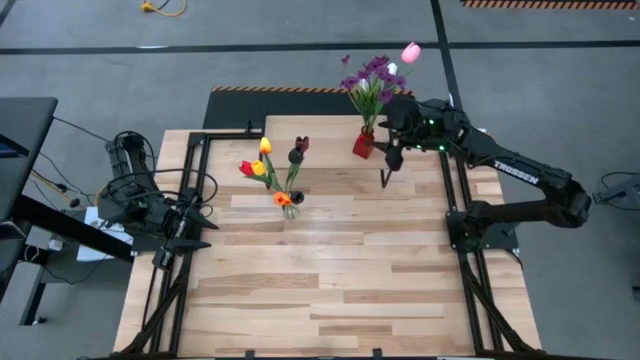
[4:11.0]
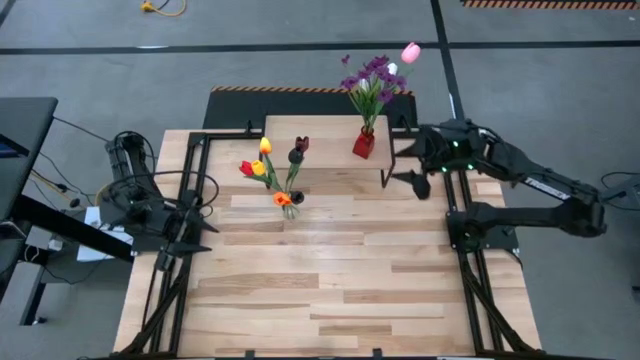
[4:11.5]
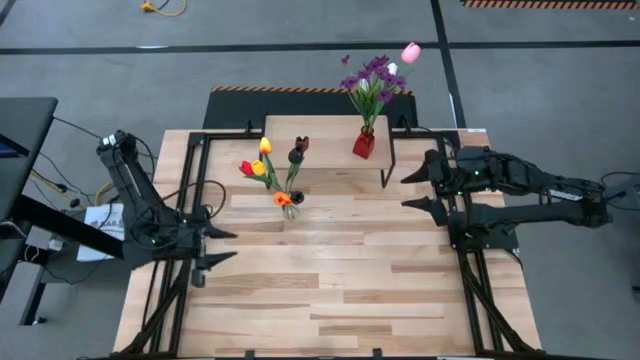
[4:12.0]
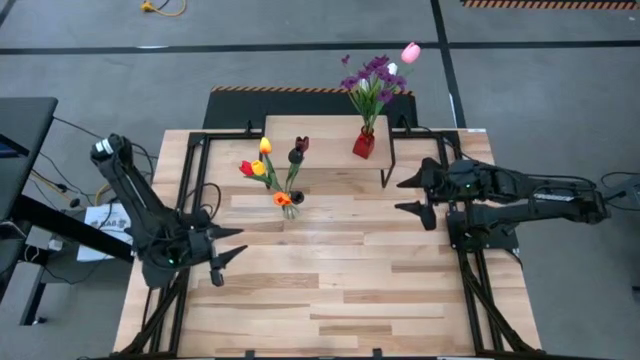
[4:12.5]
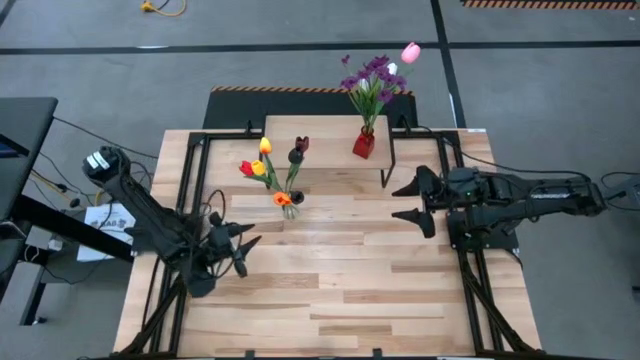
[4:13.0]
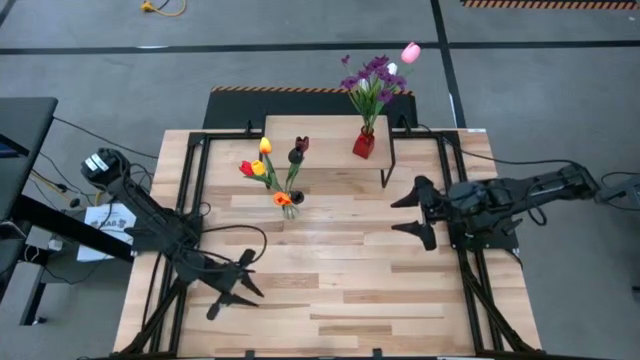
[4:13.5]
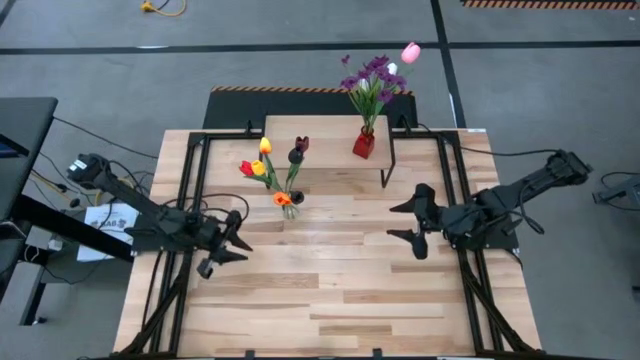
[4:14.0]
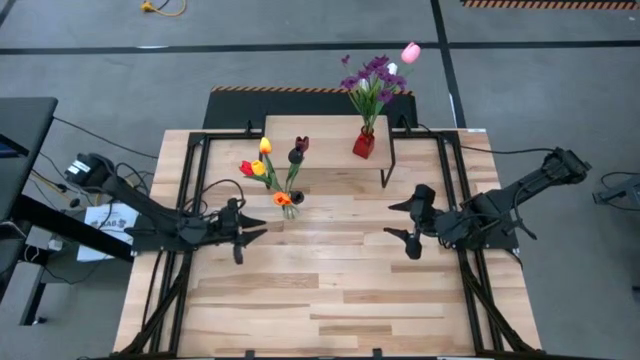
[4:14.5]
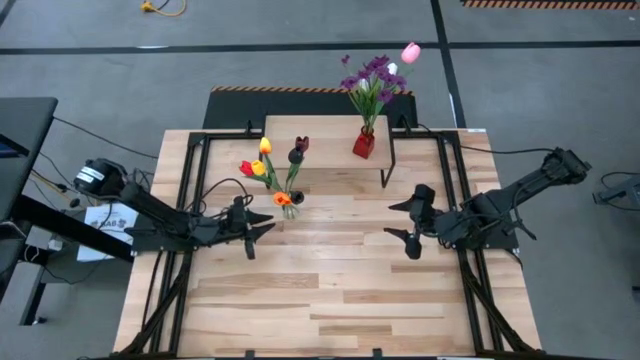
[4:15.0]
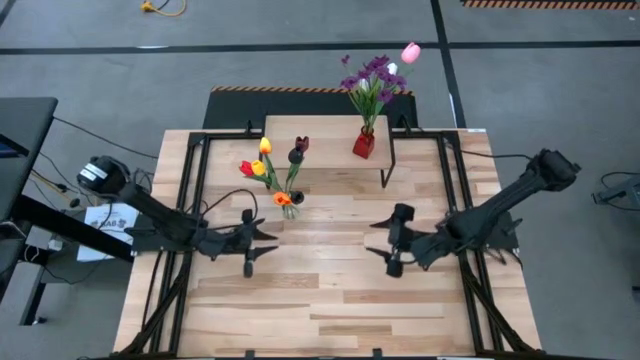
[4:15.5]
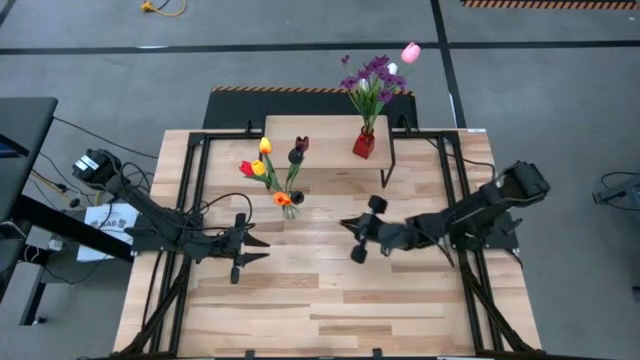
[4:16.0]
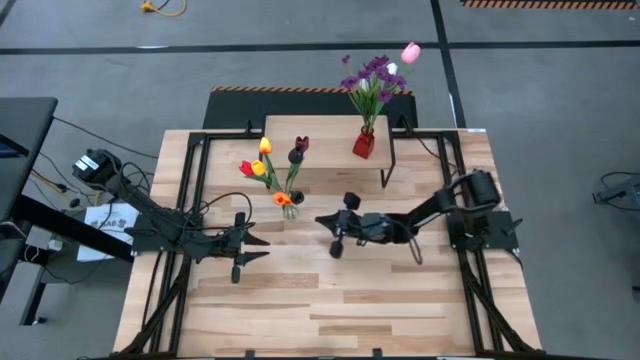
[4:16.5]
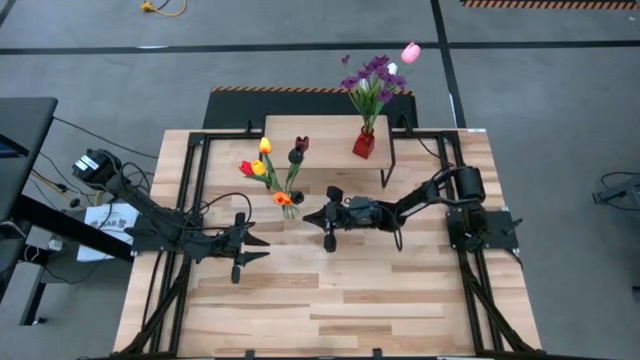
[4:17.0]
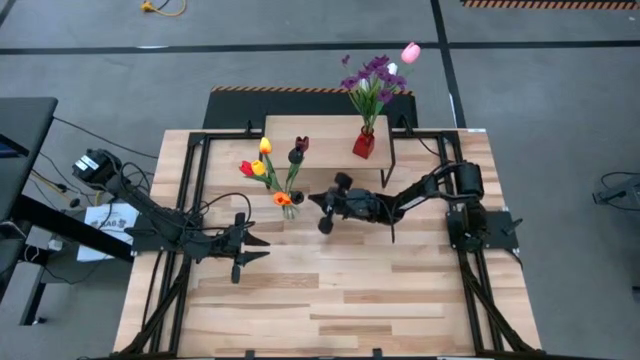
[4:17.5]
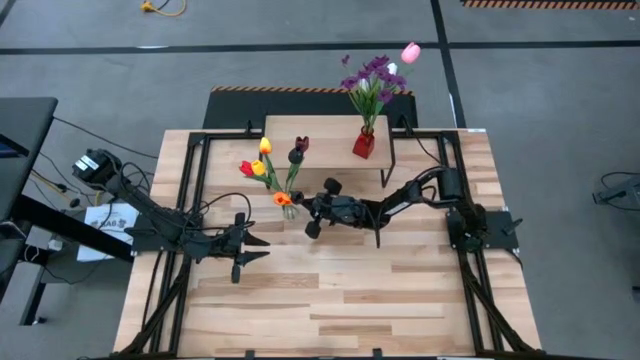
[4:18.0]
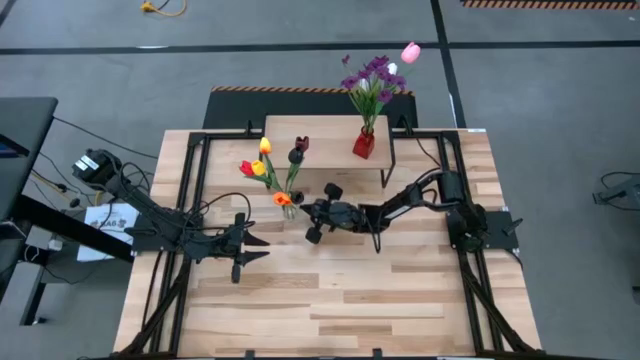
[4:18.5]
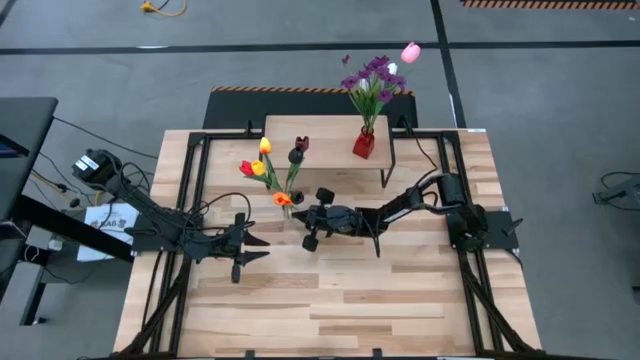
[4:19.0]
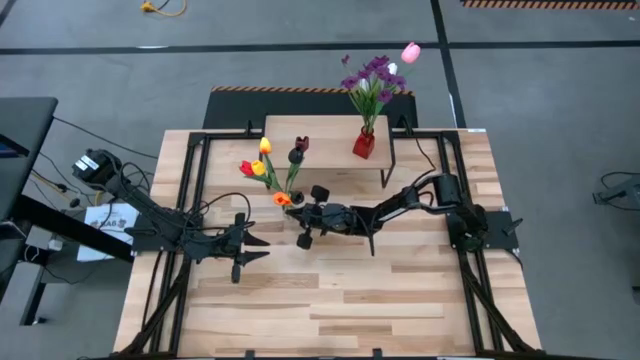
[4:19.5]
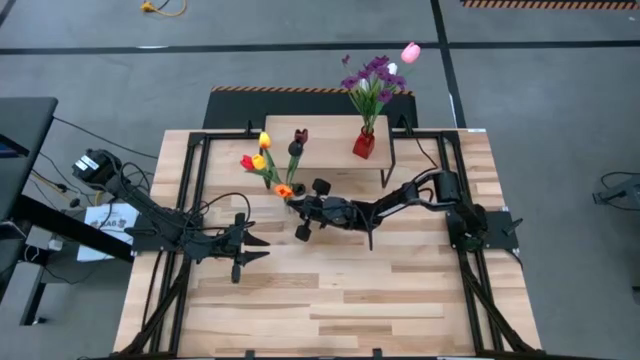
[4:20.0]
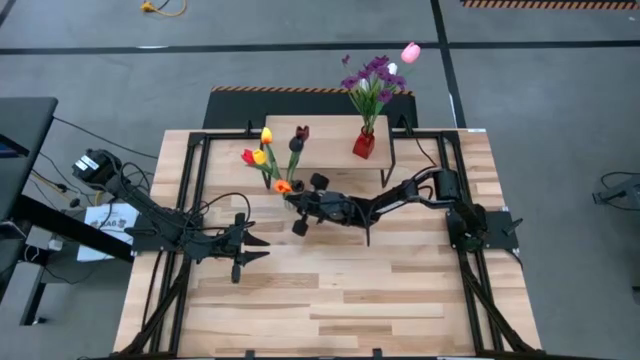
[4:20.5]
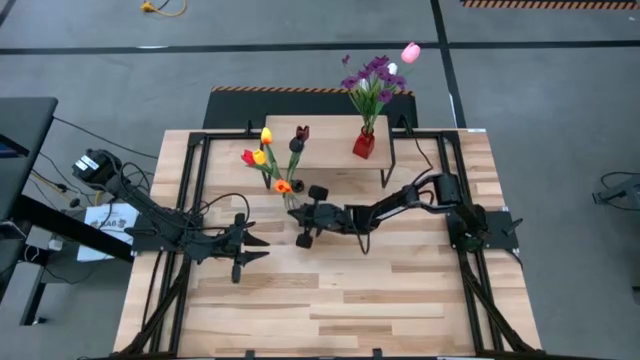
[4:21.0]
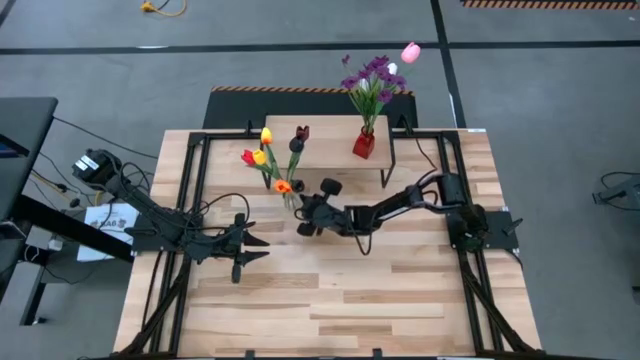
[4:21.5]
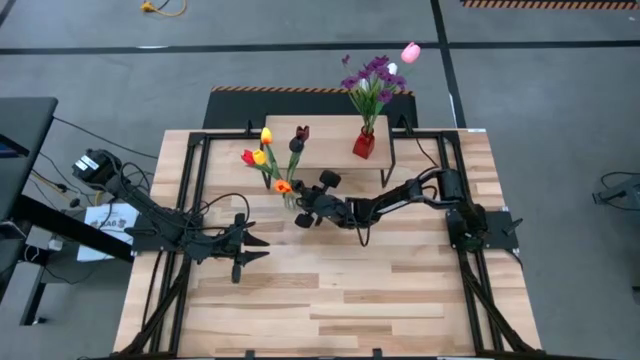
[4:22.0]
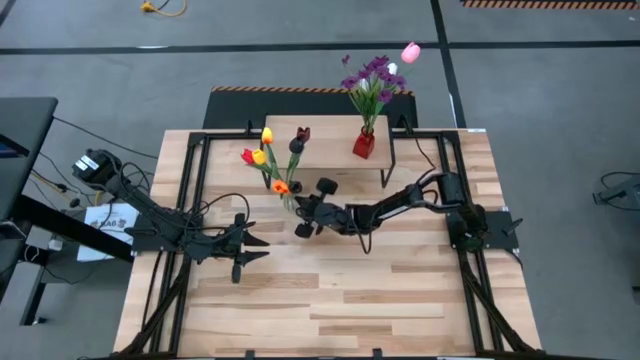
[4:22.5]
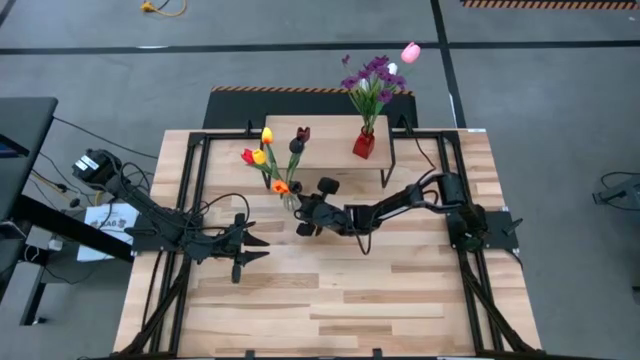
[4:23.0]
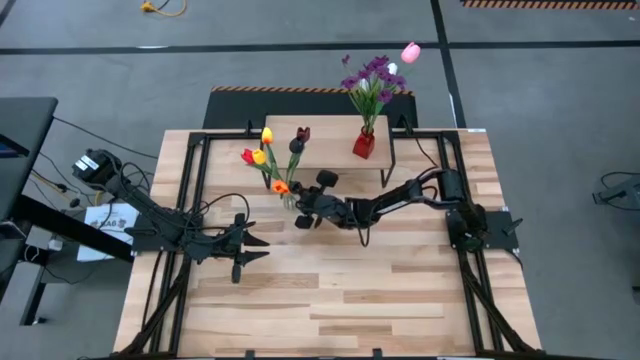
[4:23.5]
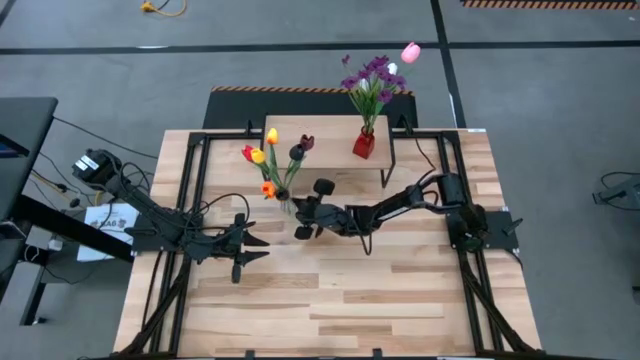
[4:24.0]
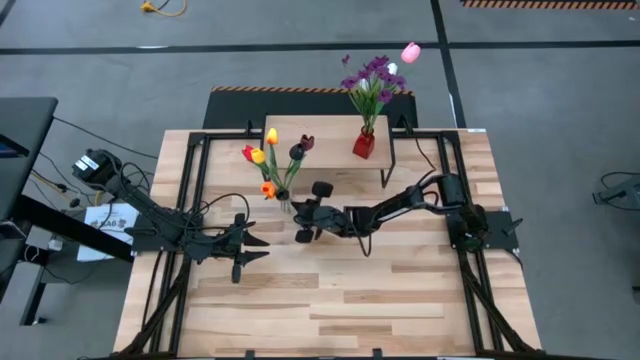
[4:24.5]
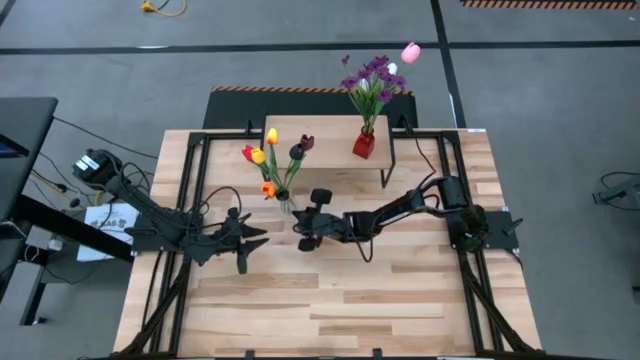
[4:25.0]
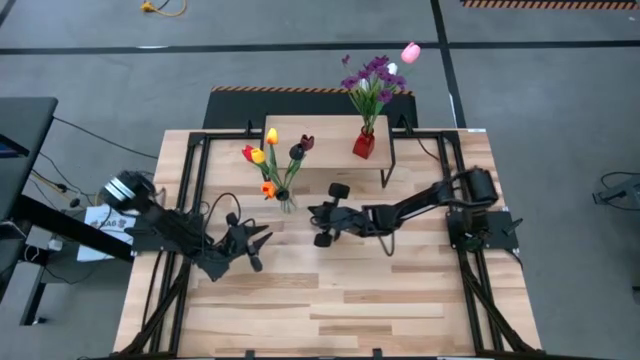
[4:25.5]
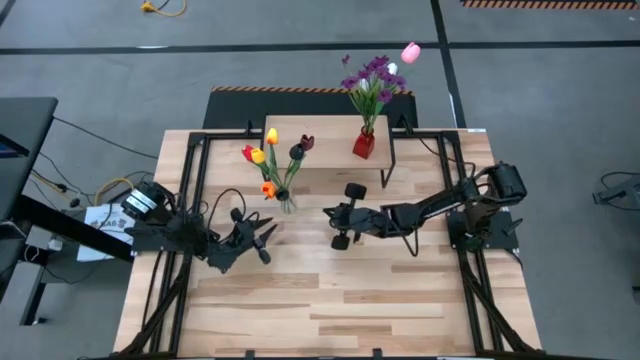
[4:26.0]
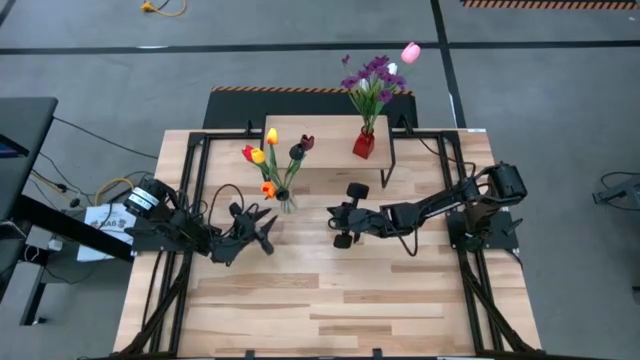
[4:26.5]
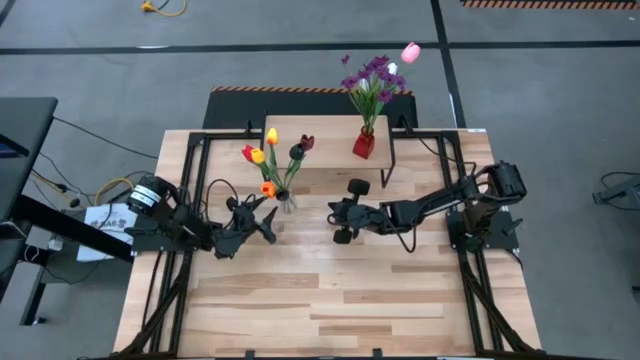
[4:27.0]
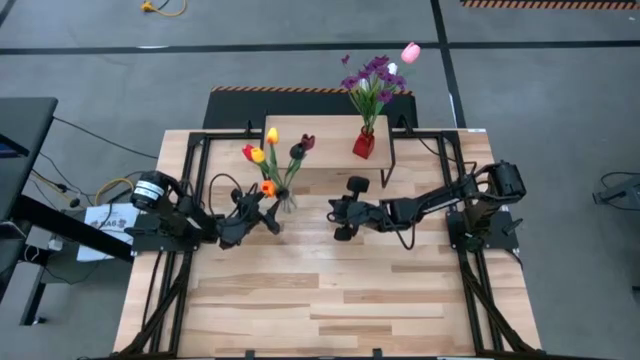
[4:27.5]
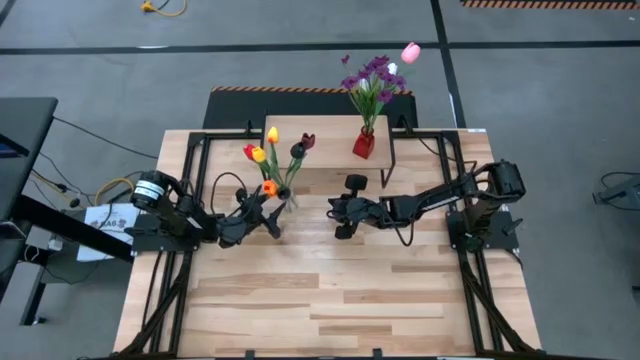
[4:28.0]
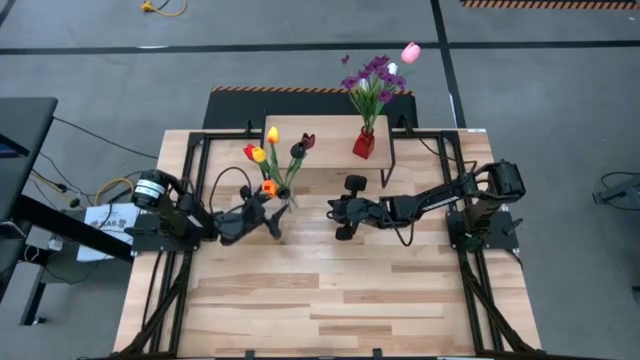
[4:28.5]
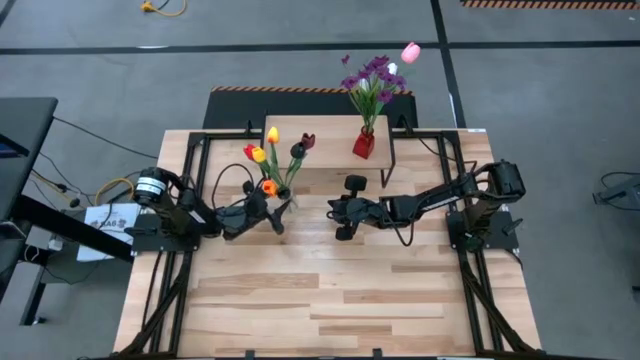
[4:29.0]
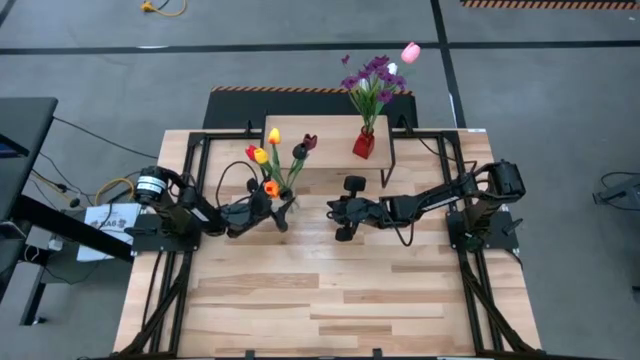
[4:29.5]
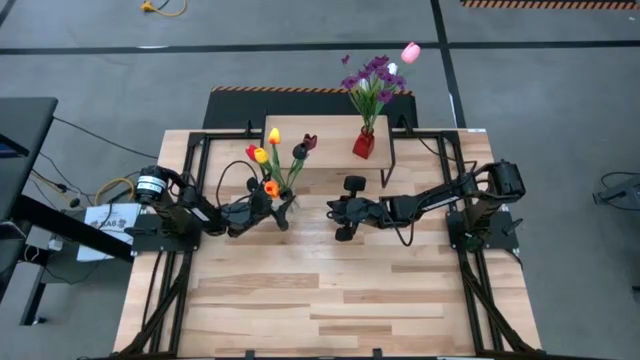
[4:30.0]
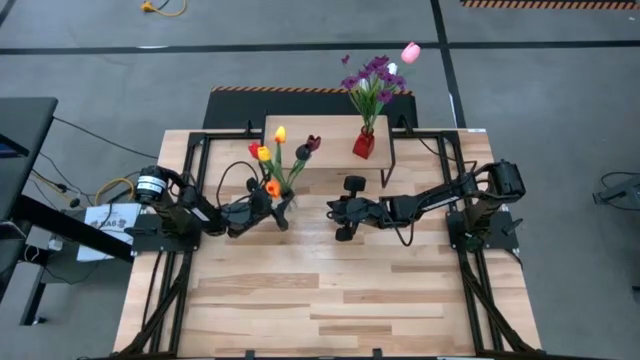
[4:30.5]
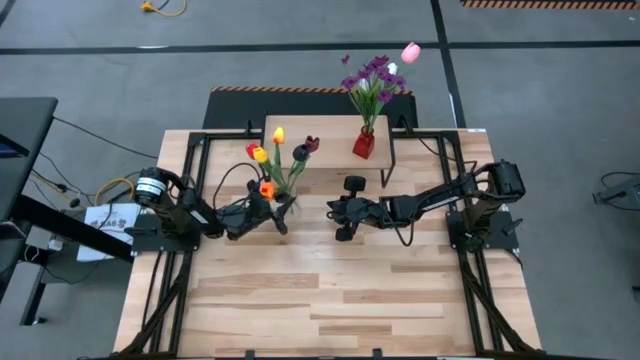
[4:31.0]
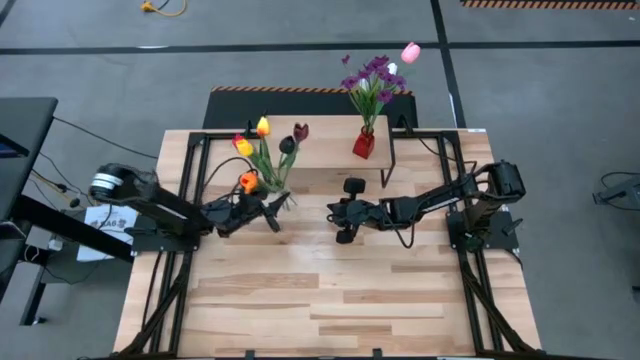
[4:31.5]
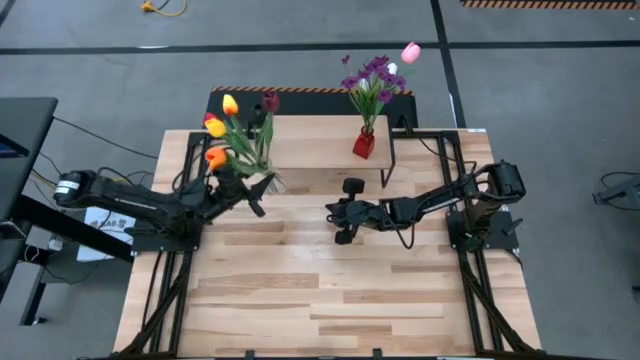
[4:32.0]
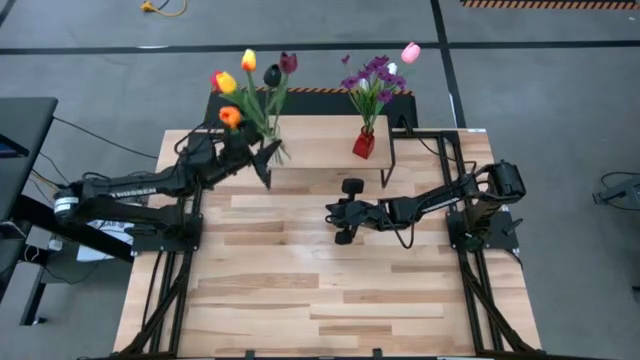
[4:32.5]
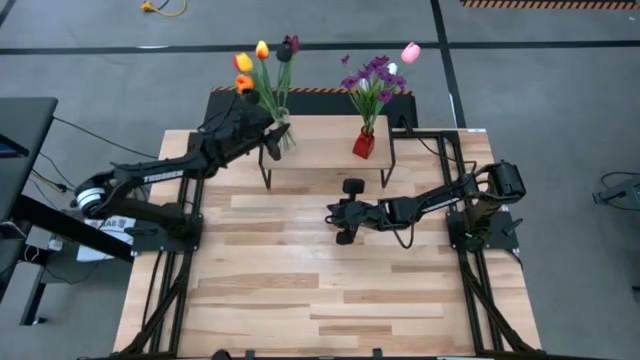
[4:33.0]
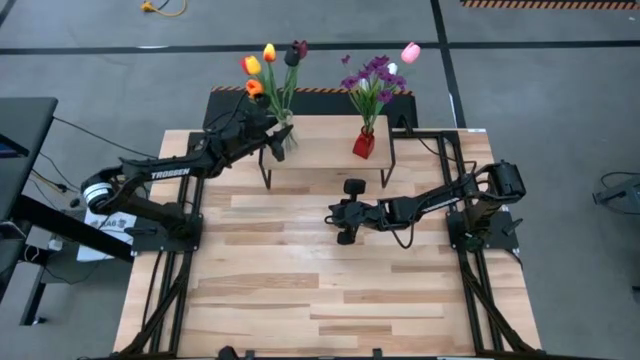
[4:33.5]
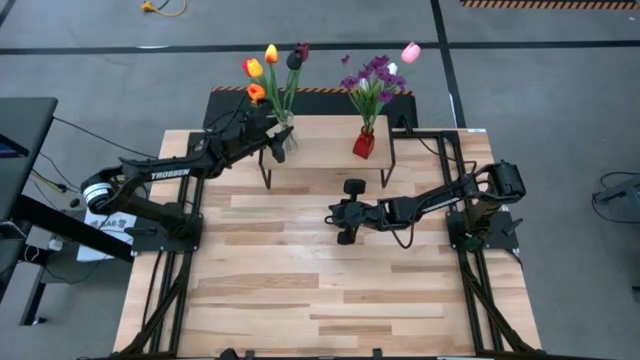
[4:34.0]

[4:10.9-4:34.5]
Task: Pick and place flowers into a vace then onto a shelf
Put the transparent flower vase with the flowers on the shelf
